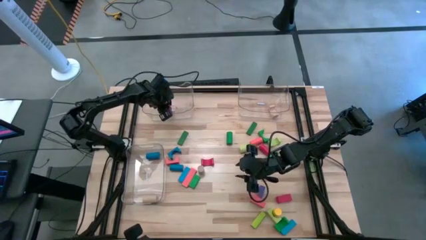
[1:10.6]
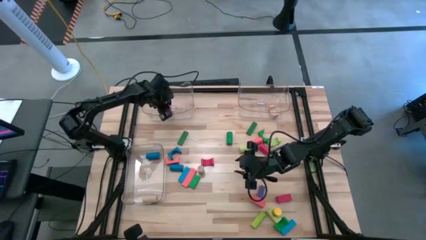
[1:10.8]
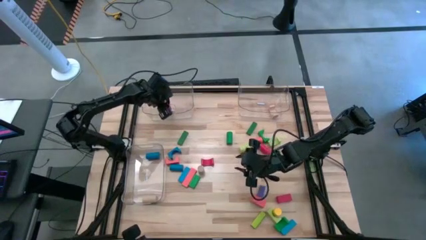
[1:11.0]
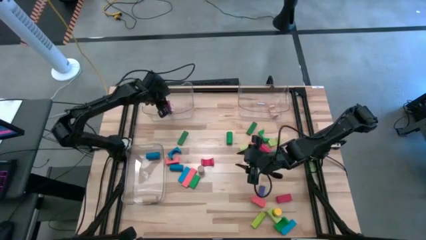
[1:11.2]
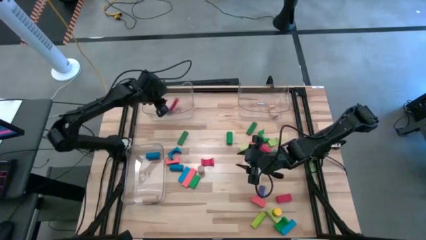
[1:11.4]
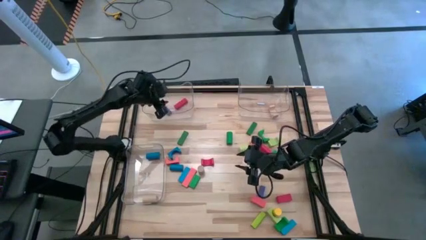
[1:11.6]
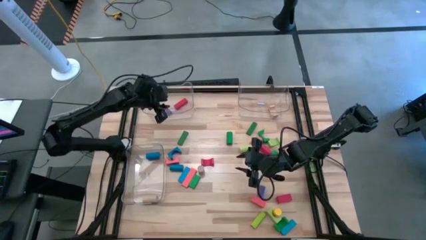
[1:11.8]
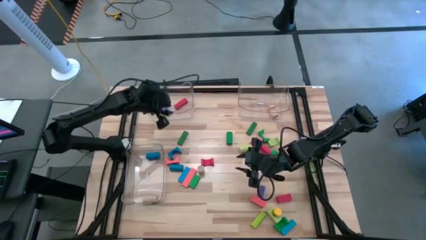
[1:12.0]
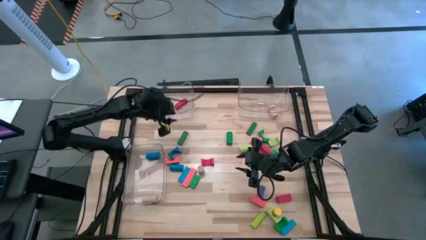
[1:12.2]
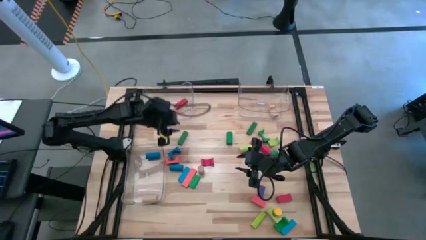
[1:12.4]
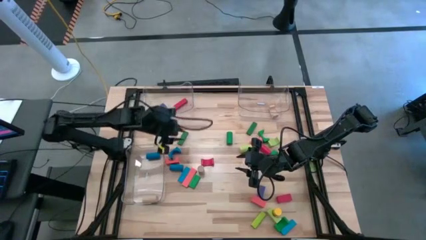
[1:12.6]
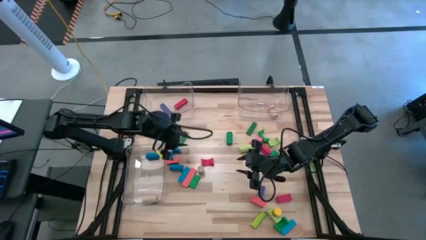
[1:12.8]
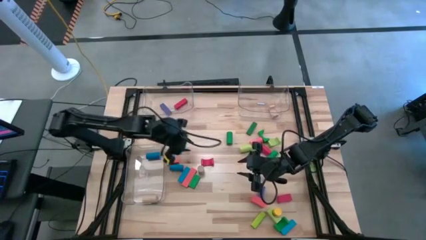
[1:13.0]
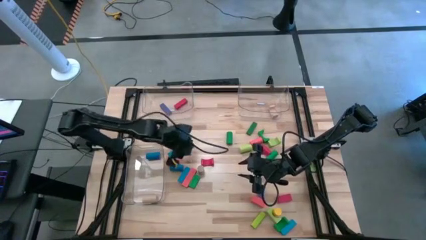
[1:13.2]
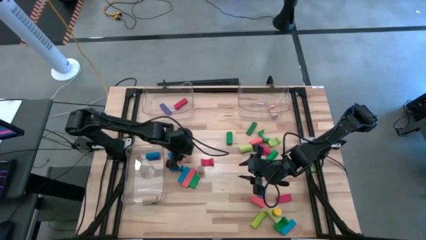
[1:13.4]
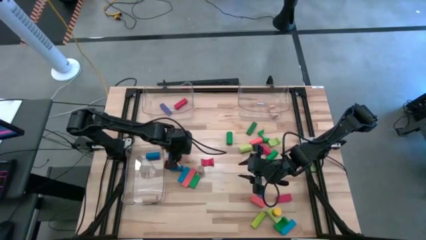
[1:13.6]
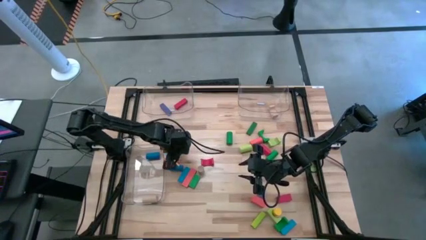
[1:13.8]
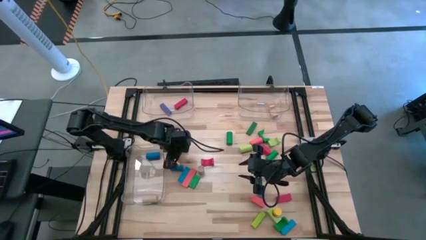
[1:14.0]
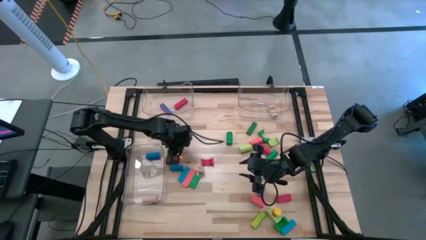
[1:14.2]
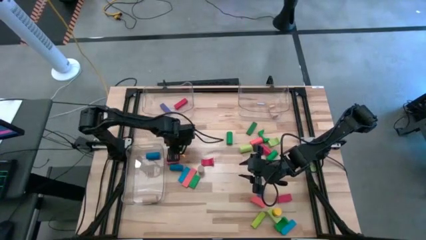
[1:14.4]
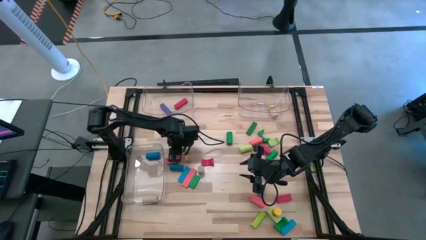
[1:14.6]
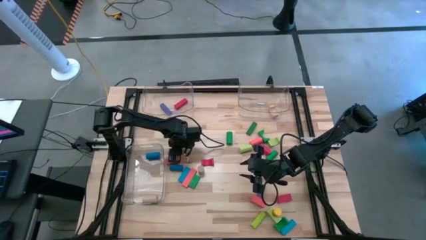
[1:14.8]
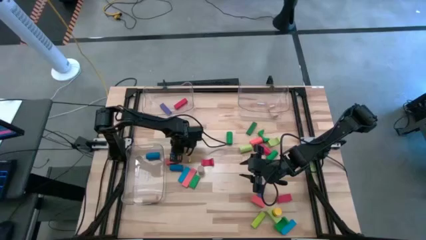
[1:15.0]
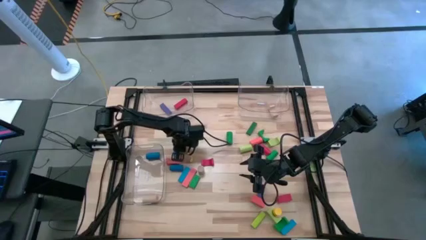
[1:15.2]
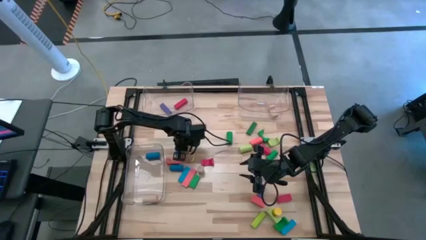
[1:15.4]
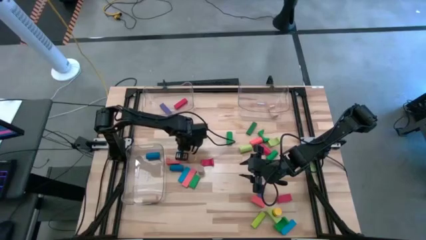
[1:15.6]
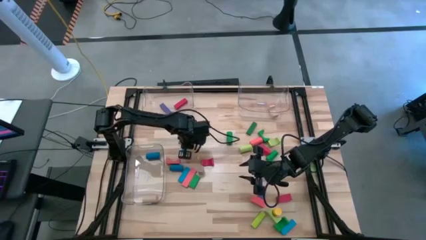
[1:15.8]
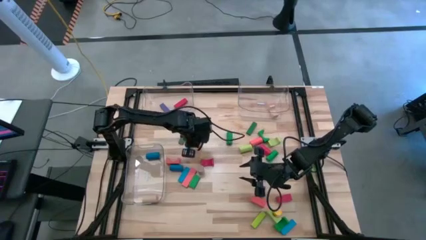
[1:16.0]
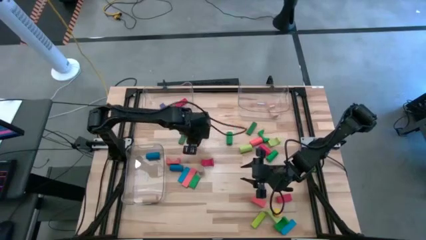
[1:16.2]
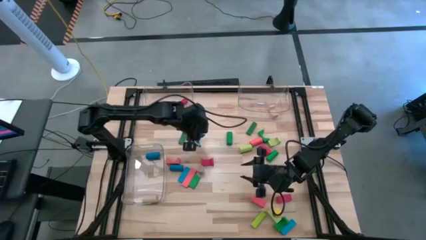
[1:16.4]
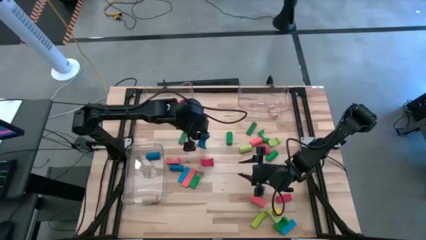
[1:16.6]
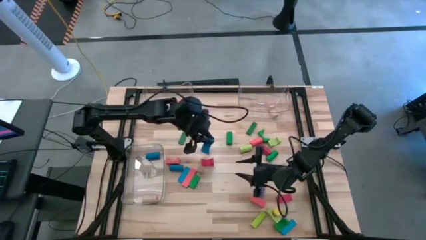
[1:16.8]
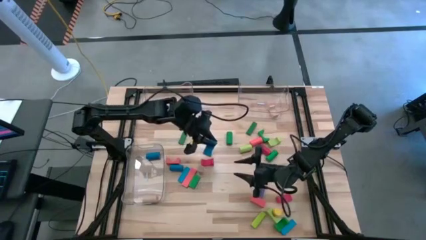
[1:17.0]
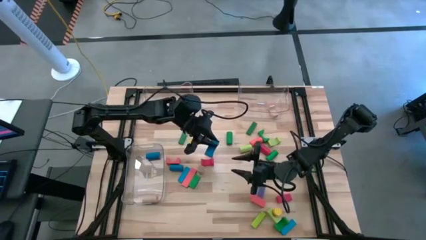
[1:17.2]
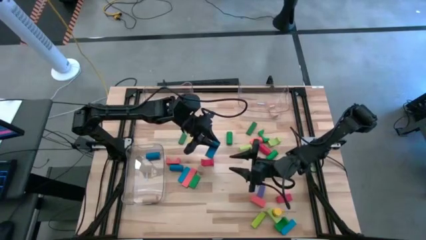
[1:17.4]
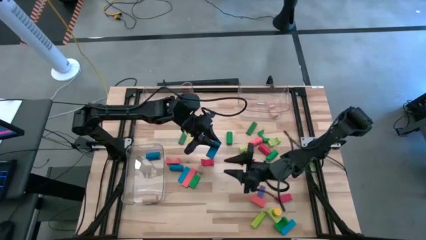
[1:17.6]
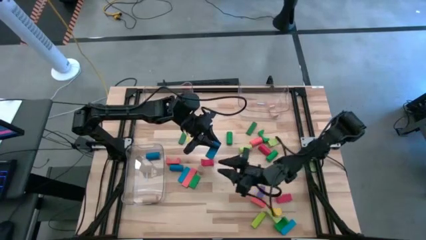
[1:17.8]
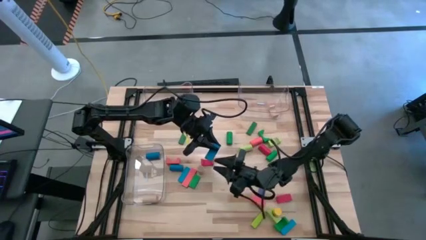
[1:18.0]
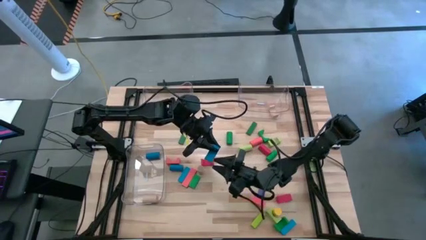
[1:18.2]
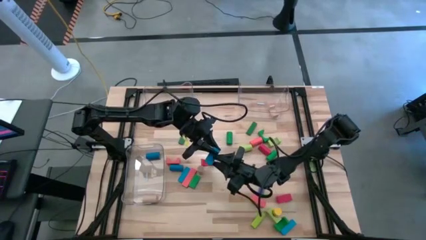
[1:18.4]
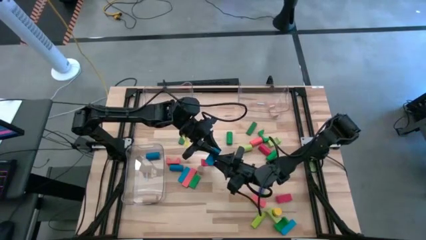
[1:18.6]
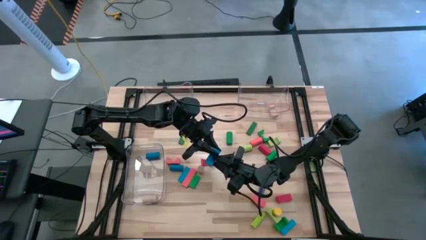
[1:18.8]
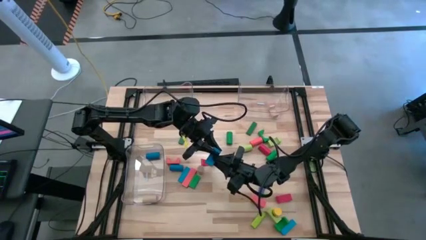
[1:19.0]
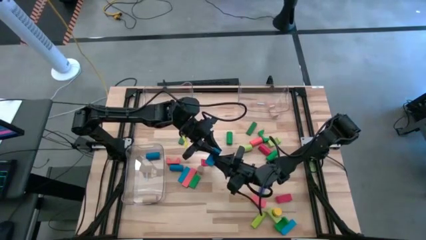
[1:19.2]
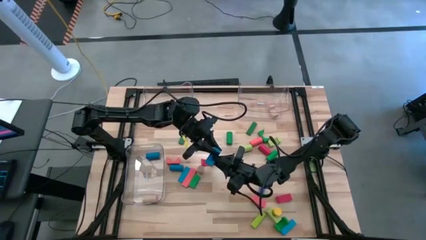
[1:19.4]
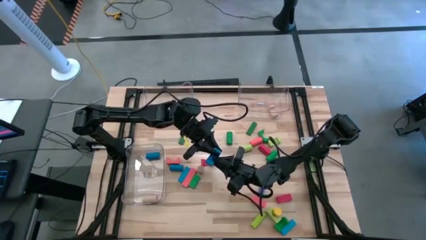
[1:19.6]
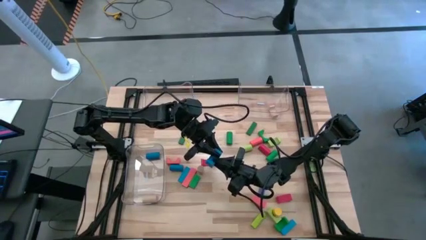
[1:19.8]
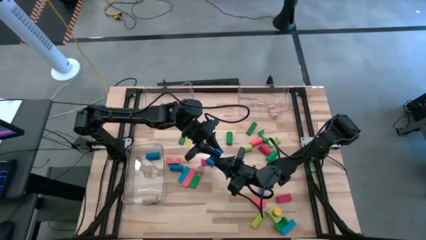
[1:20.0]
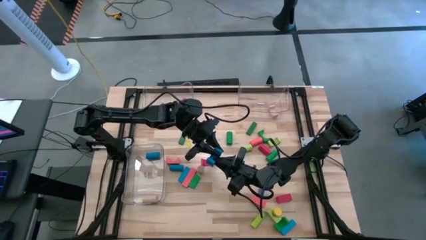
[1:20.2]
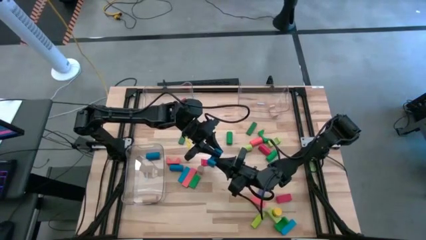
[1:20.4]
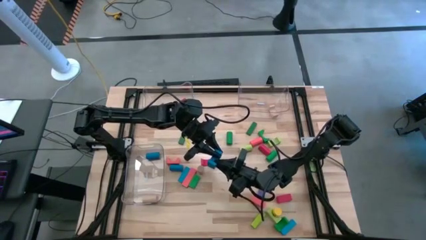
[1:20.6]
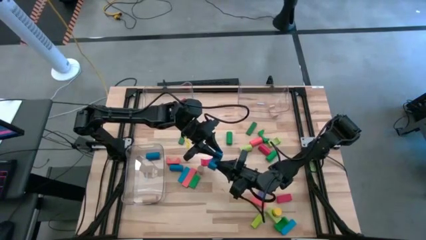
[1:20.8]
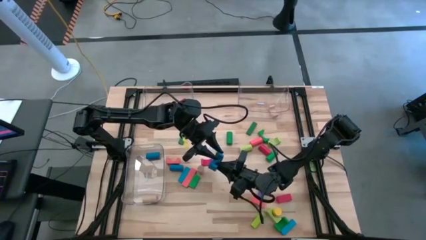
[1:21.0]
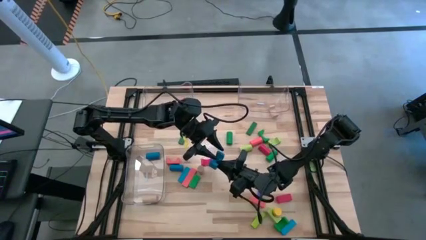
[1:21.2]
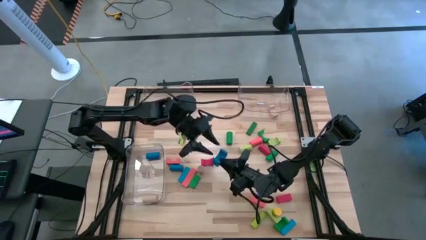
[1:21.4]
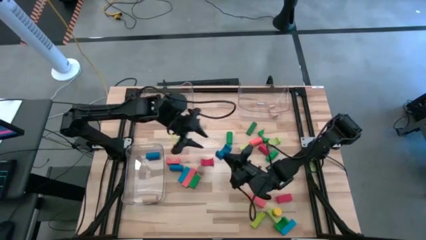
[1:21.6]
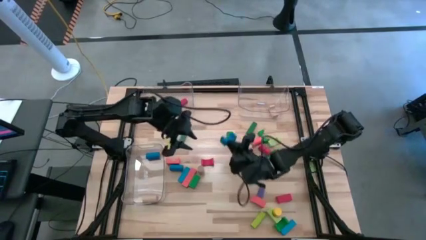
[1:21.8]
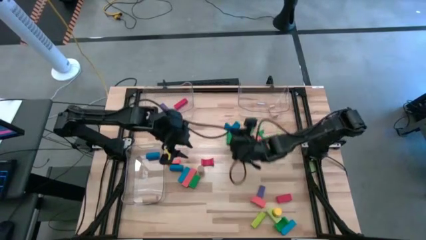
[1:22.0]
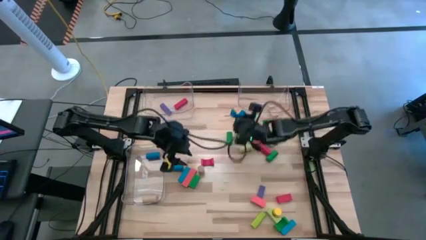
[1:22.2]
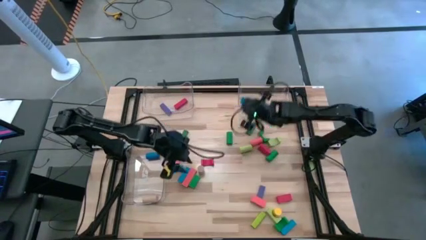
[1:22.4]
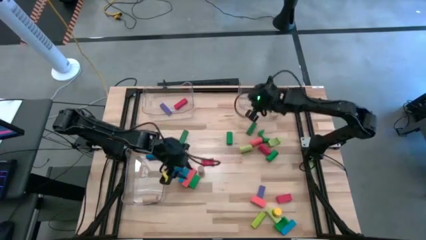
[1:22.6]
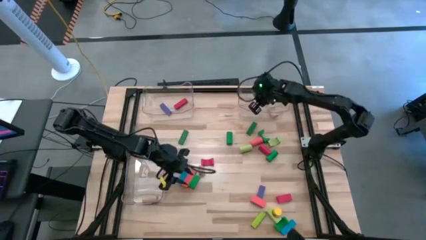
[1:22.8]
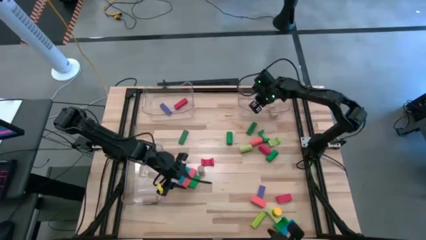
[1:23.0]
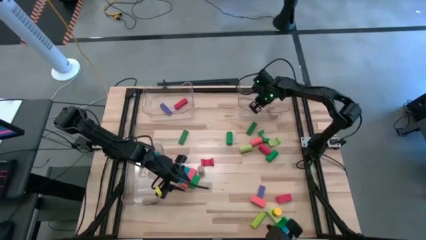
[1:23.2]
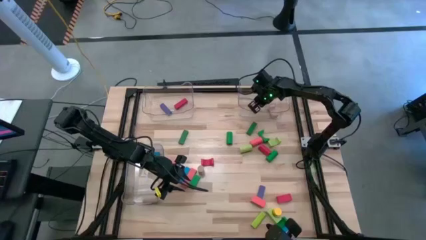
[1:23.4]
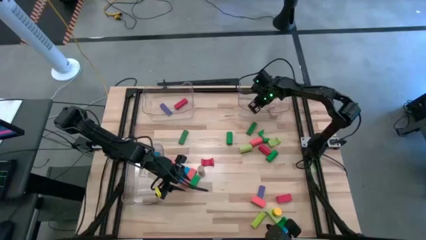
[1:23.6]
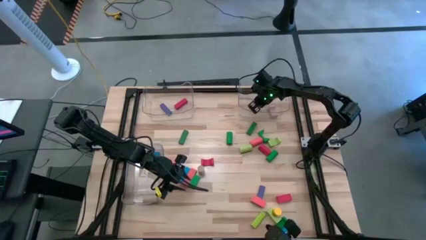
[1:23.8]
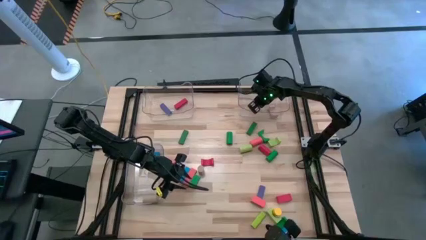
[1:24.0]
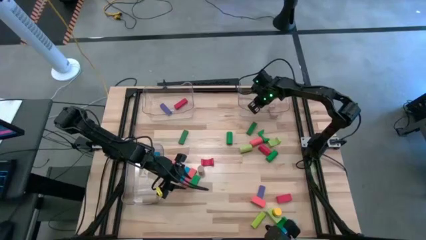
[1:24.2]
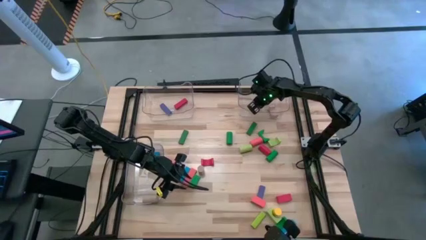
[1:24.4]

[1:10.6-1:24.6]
Task: Sort blocks by size
Put the blue arch block into the top right transparent bin

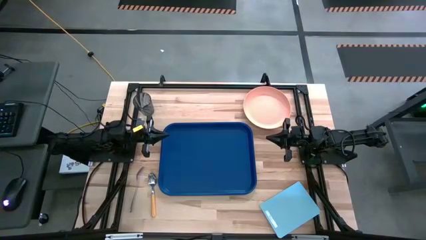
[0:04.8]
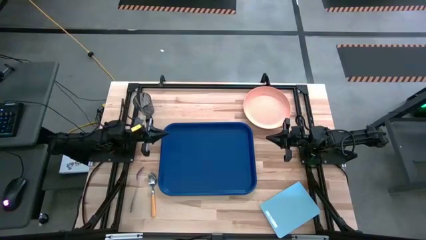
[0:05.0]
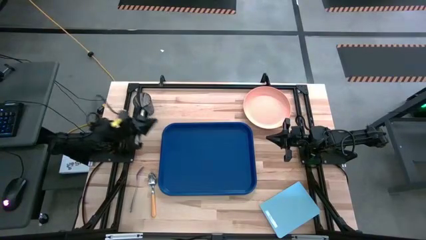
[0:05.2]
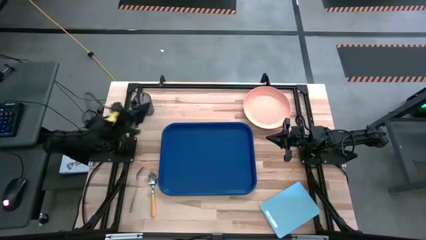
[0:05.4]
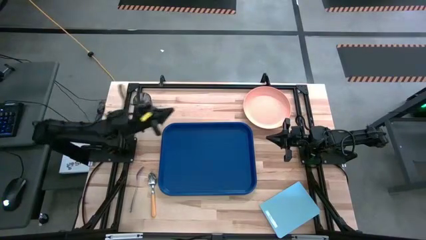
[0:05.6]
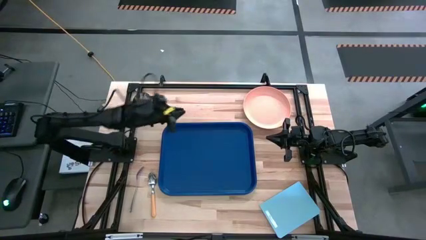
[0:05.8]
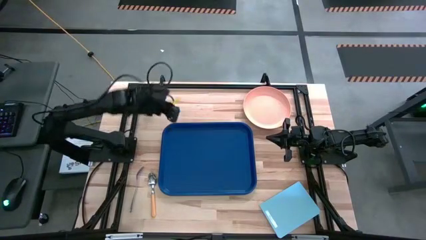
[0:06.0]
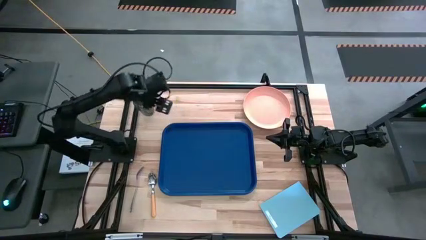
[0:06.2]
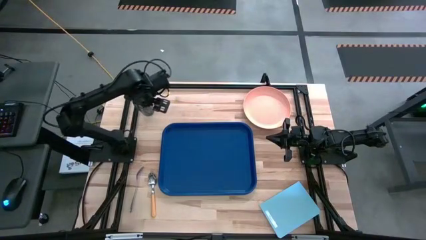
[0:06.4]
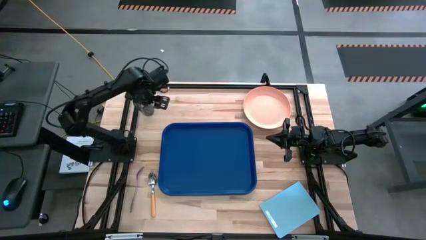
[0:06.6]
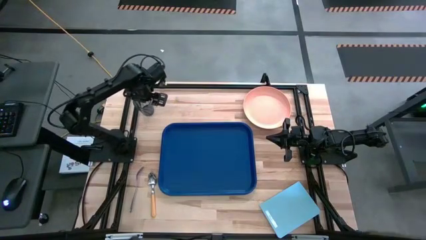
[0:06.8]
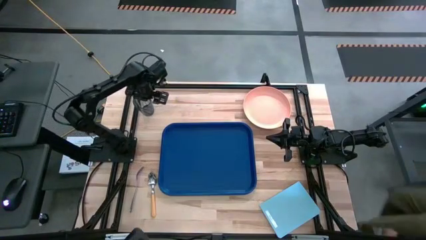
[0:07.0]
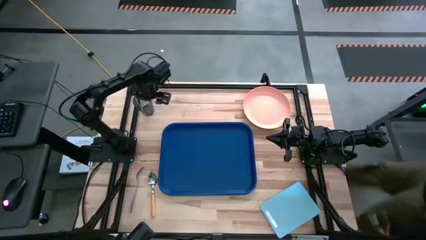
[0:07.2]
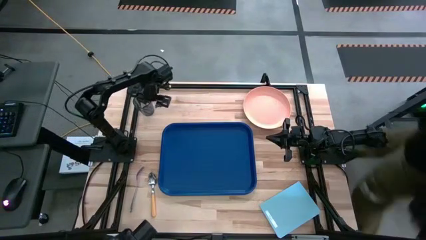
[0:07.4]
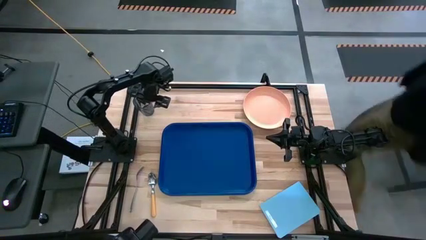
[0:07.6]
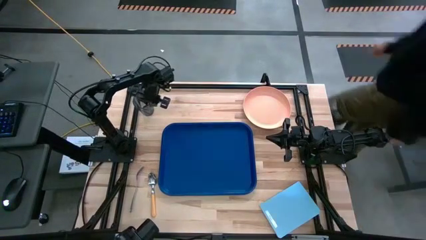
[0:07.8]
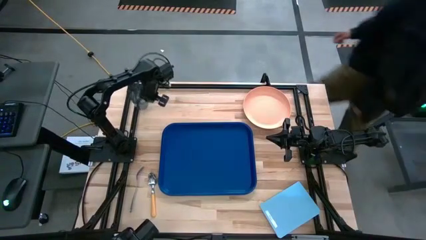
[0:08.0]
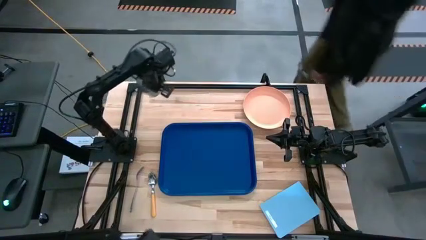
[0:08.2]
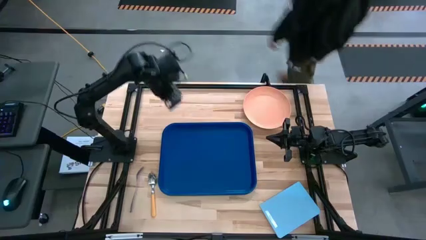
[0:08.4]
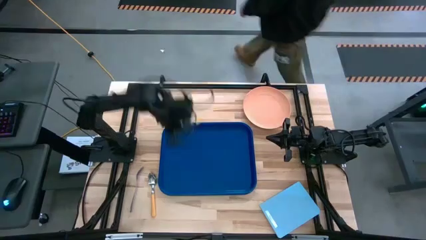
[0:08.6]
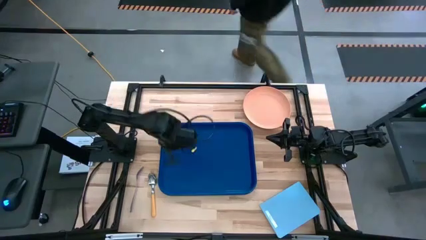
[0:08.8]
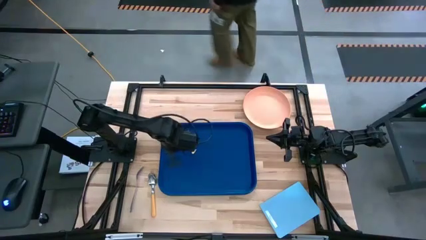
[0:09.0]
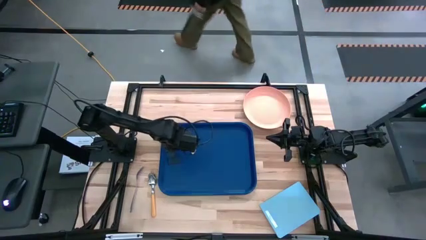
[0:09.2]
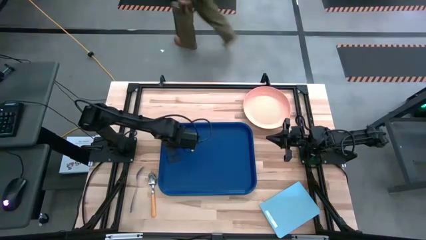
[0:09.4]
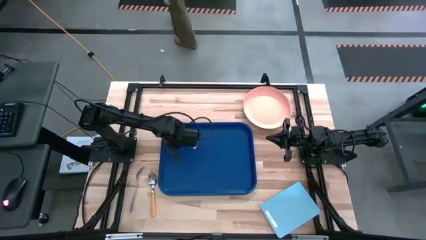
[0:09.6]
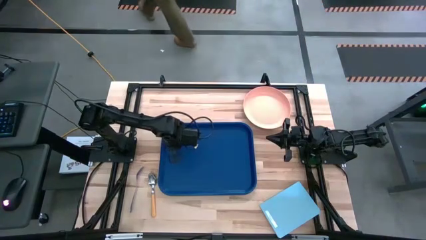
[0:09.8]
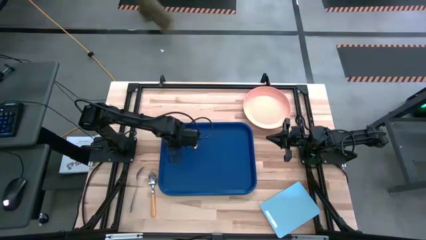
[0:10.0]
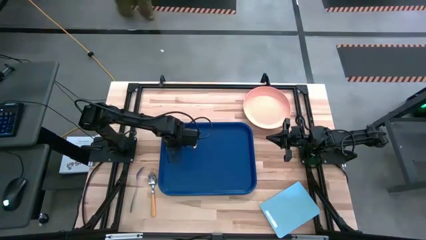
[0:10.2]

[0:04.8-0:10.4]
Task: Pick and place plate/cup/fork/spoon on tray
Put the gray cup on the blue serving tray
